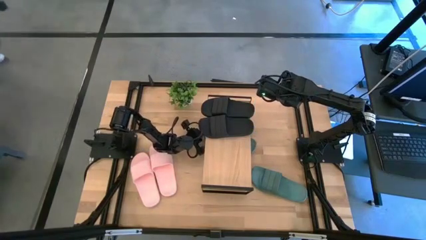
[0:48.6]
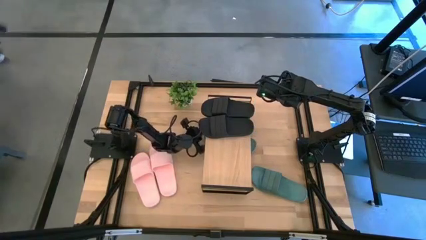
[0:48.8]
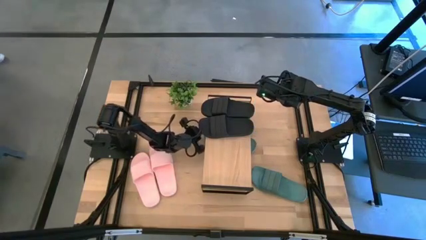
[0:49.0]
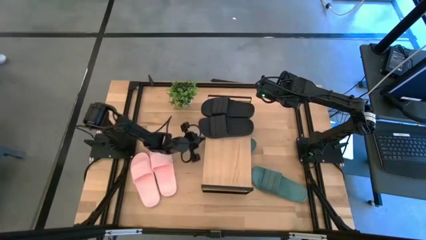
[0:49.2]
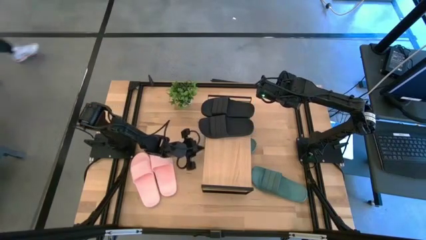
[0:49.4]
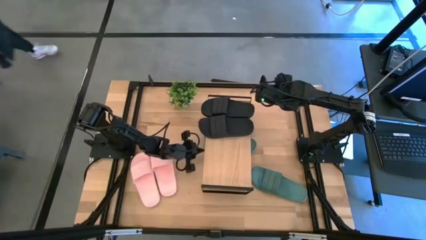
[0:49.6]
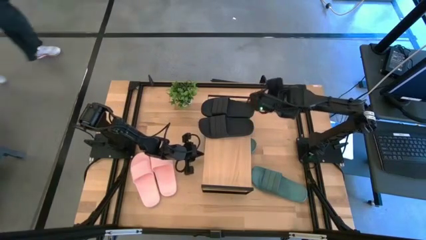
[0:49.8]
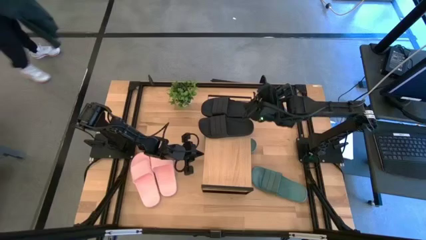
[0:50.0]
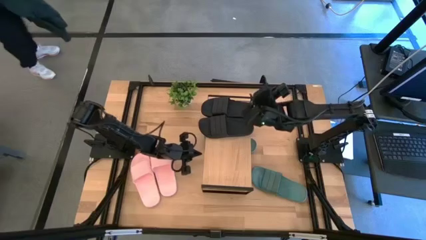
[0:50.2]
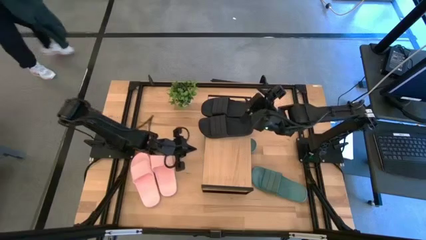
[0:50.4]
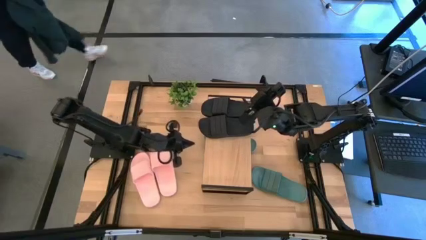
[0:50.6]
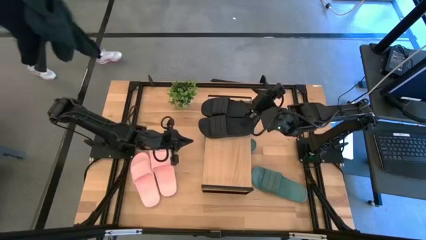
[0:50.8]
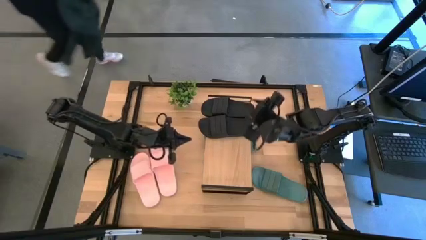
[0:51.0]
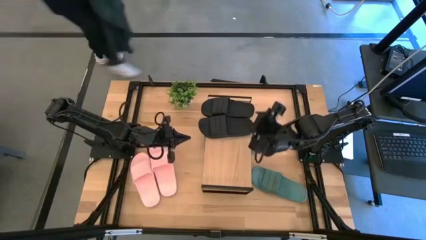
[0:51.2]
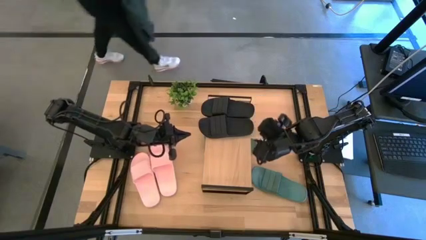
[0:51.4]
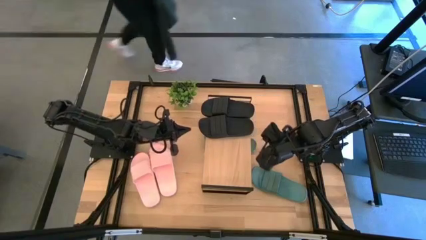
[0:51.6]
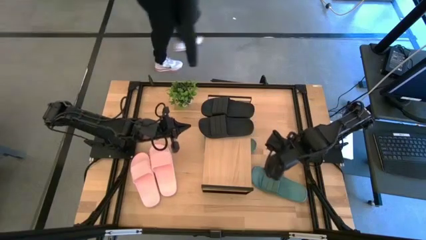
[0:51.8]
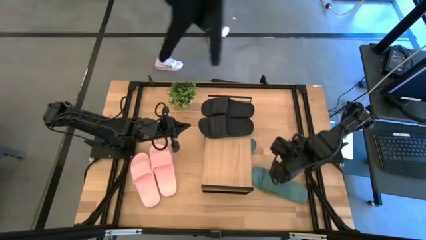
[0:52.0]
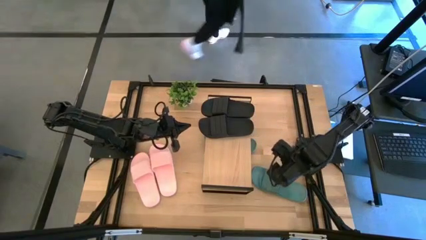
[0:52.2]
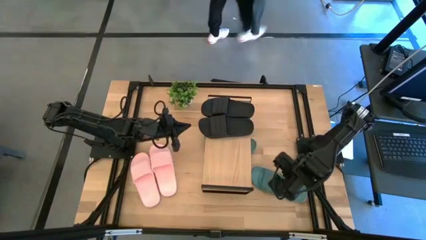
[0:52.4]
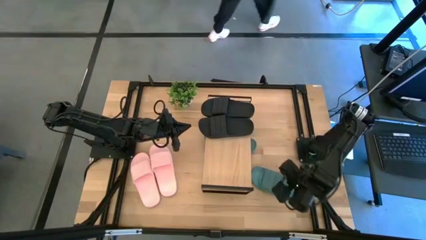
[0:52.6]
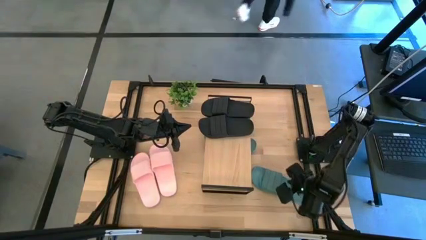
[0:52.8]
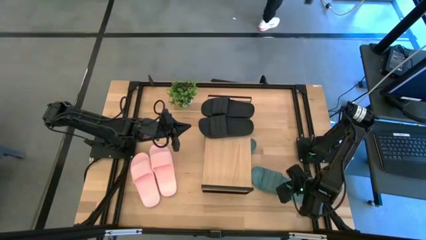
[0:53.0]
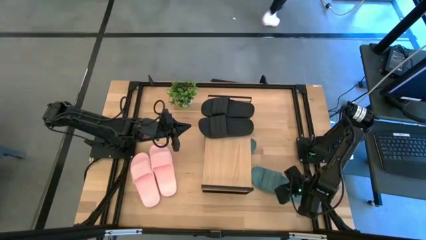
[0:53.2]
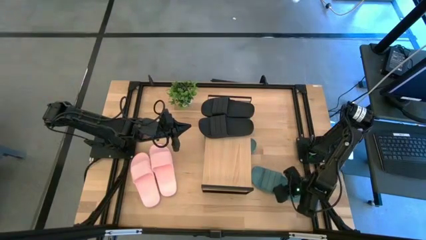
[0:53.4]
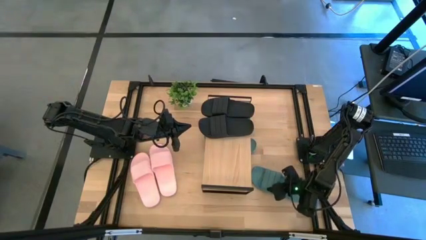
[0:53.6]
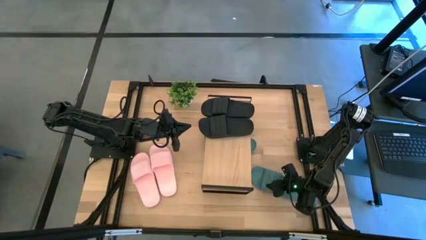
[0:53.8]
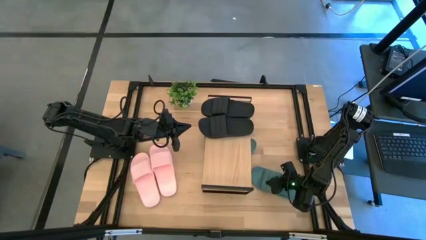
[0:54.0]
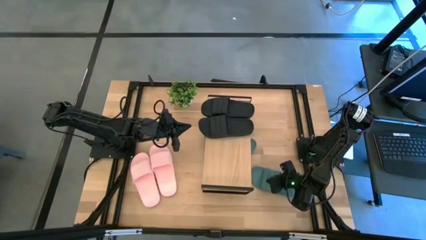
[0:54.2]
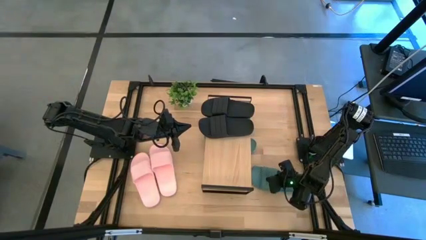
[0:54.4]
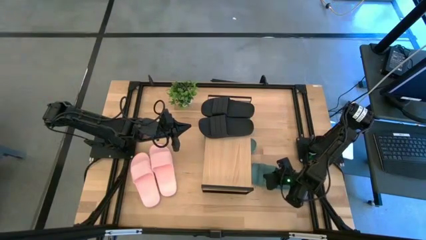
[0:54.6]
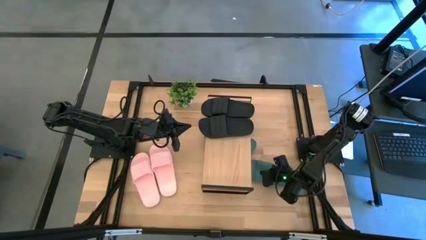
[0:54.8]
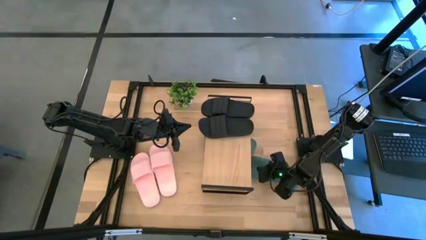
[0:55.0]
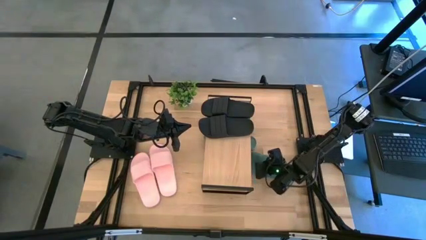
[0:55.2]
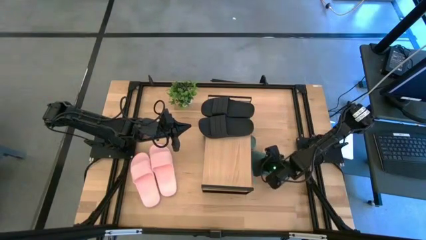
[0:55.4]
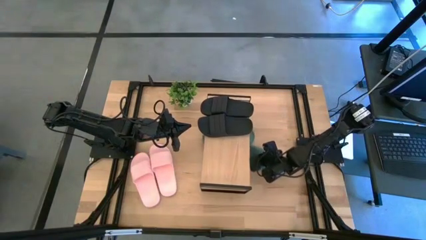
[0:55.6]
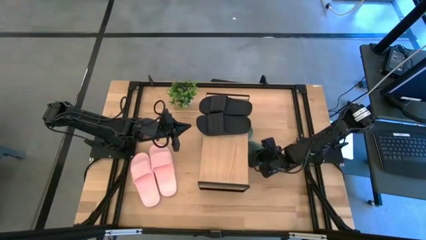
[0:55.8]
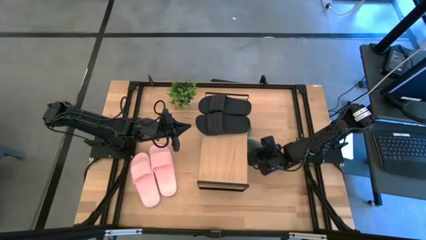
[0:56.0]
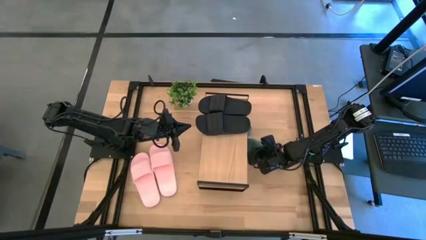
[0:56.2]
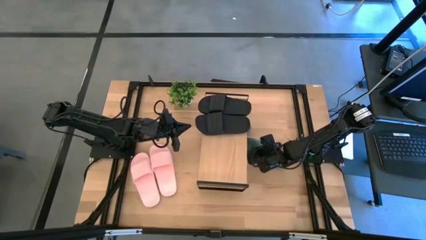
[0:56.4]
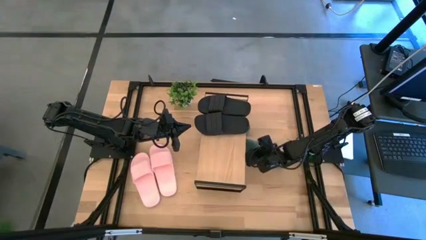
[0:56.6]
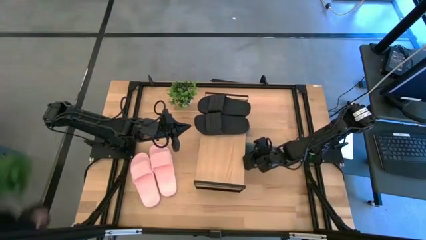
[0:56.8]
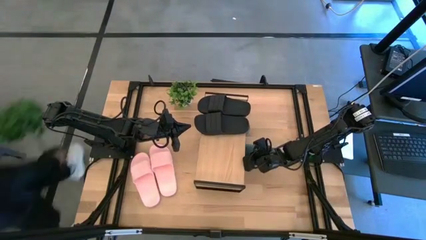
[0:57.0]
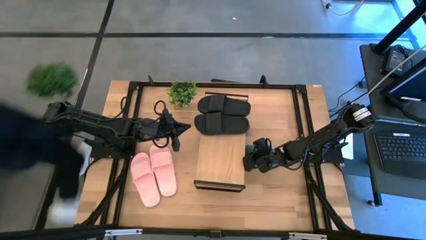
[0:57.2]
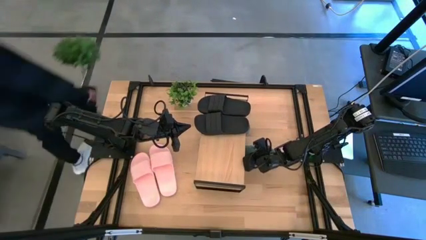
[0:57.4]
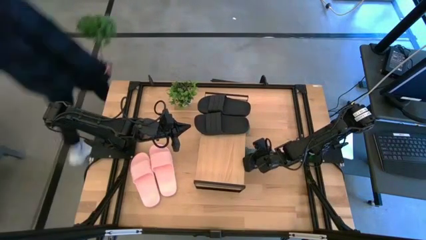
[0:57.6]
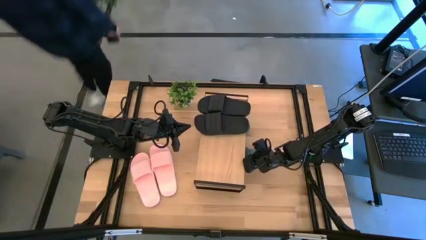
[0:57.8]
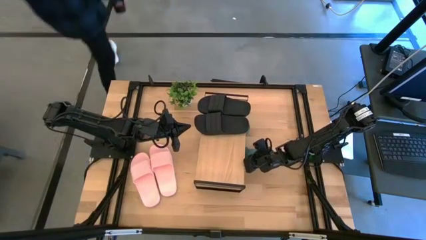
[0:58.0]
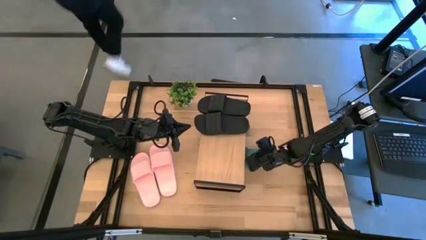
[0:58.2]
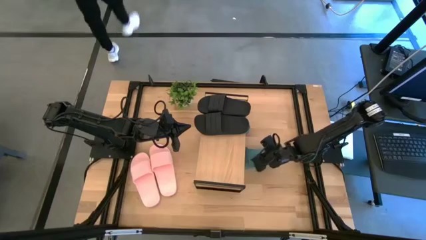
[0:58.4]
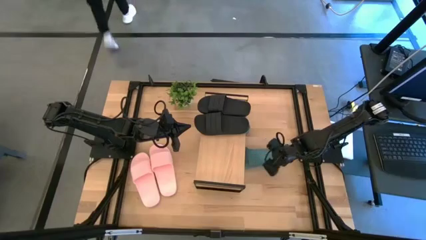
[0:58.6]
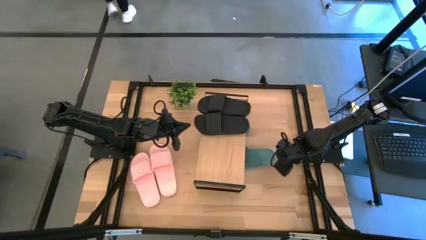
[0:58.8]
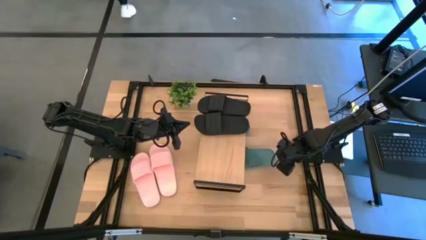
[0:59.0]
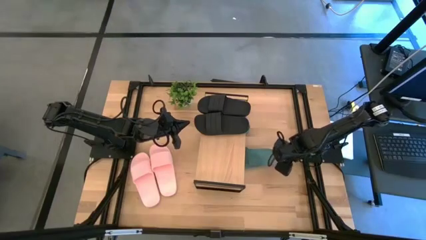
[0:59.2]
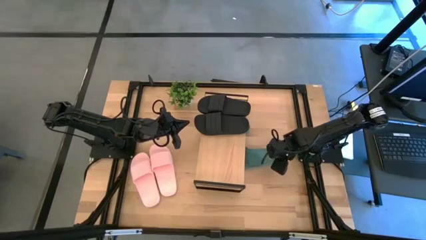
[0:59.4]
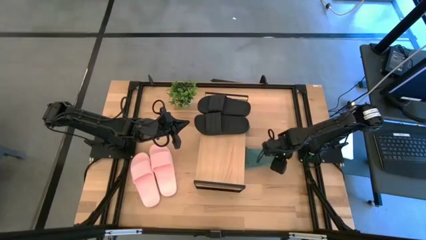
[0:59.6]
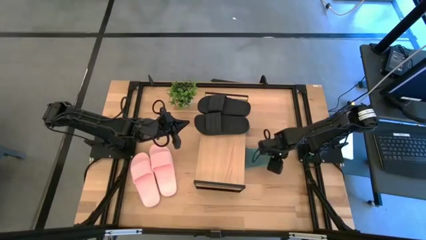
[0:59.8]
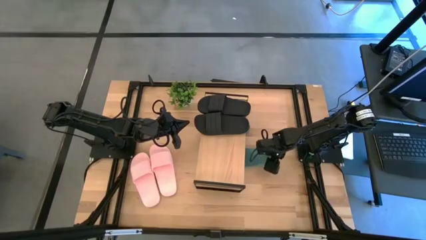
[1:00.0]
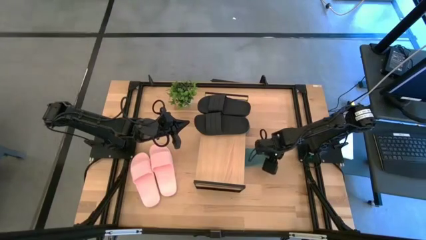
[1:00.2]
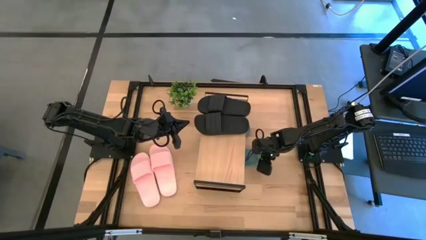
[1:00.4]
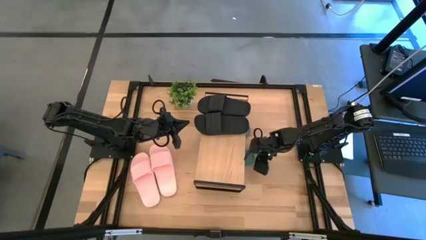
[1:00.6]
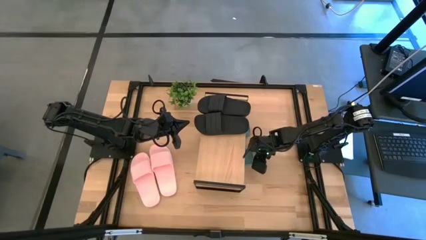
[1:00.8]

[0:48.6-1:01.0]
Task: Pick and place slides into the shelf
Put the green slide under the shelf

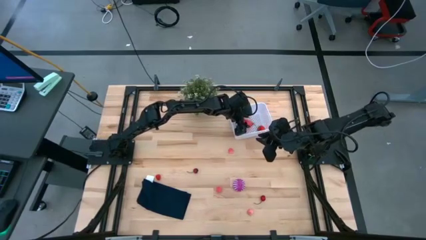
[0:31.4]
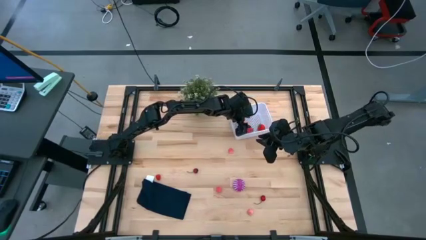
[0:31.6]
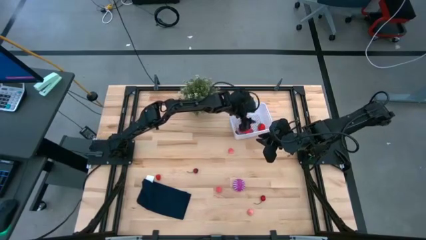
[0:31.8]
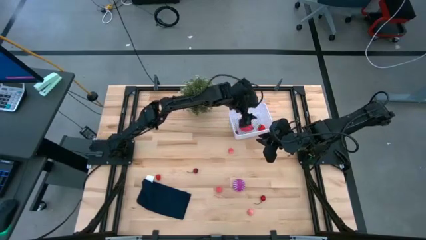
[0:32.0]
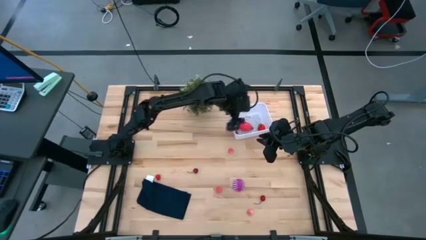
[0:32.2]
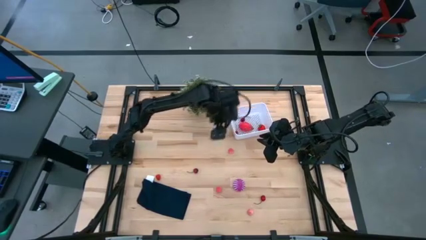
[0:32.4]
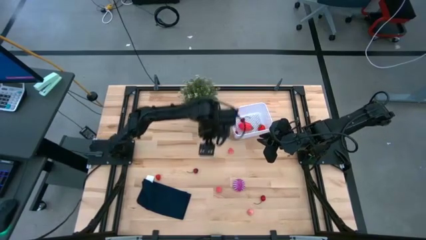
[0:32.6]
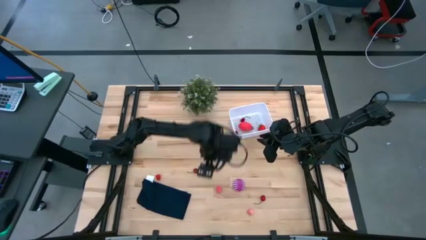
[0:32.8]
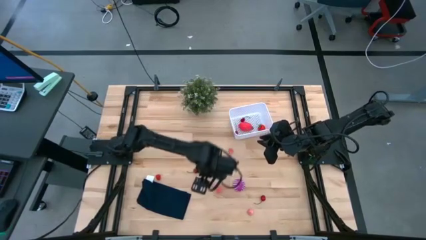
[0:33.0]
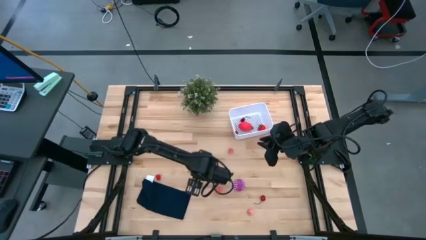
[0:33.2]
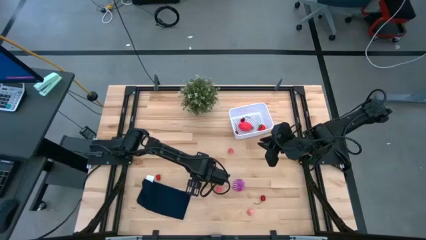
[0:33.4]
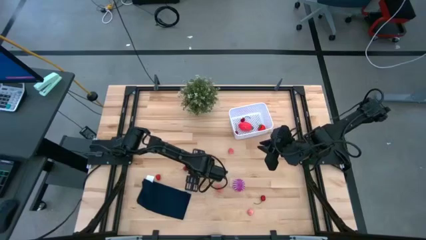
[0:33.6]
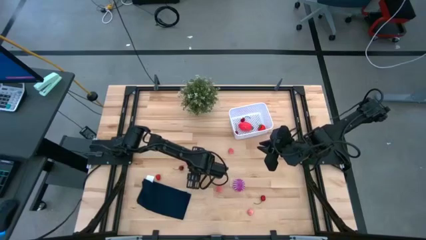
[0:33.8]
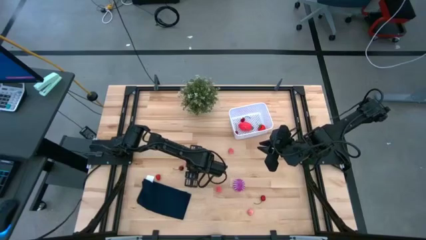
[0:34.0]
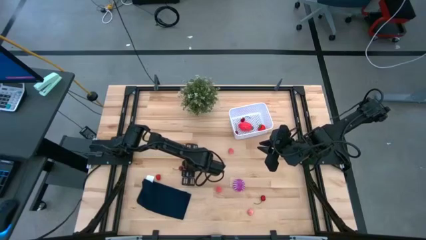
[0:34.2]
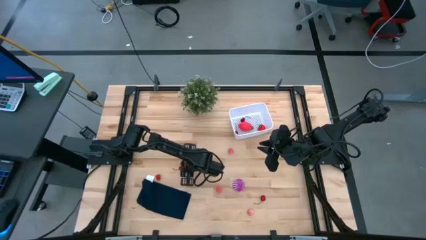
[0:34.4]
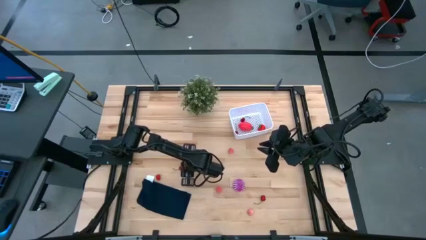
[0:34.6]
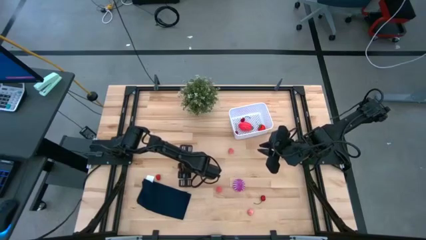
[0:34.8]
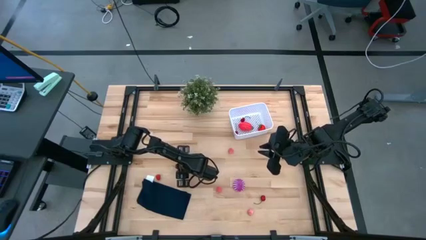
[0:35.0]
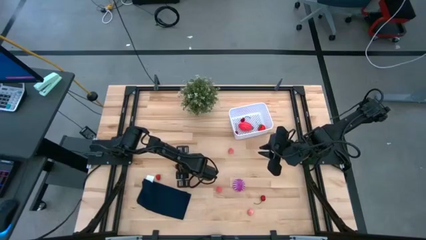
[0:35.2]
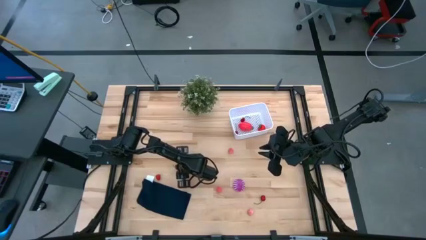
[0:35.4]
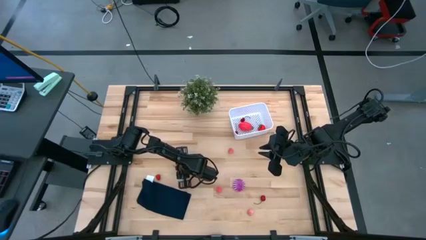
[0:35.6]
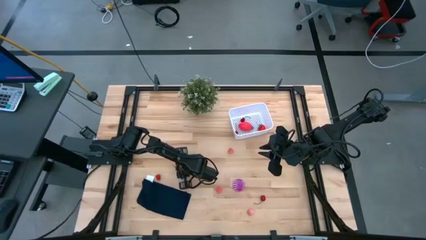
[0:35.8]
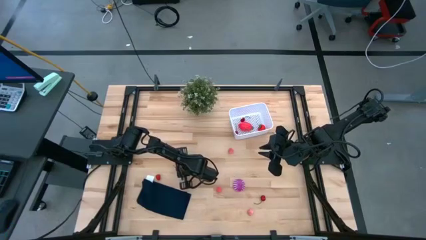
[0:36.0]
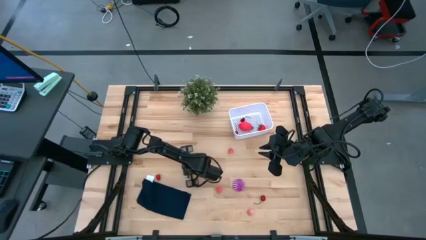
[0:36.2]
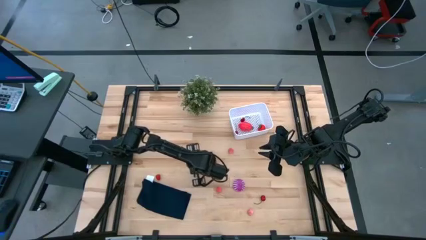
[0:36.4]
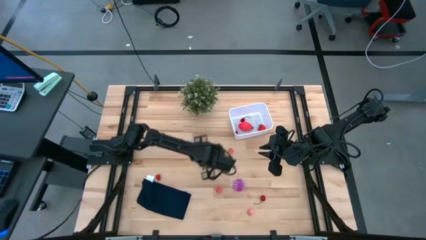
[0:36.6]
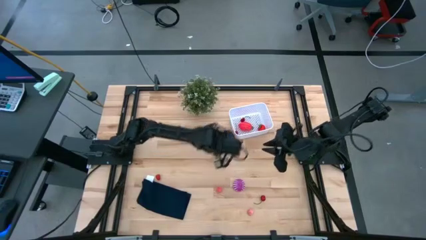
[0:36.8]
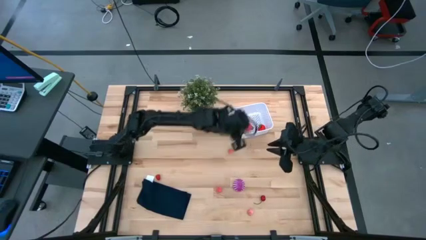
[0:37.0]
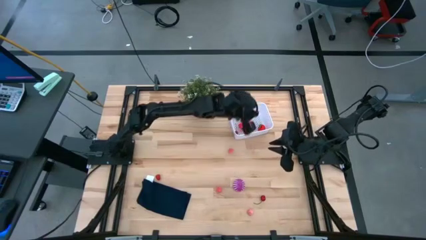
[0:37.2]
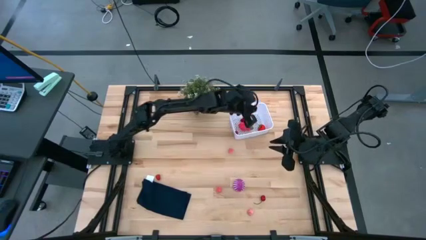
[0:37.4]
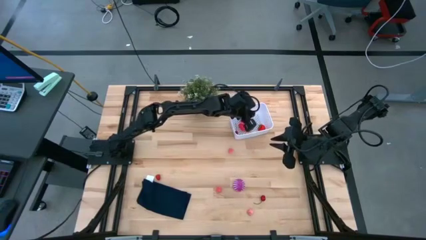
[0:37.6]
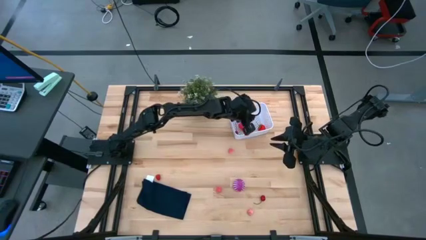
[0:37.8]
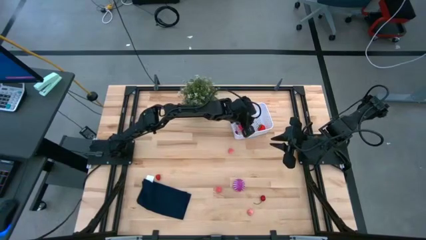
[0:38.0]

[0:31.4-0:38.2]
Task: Pick and placing Produce into tupperware
Put the top cherry into the bin
